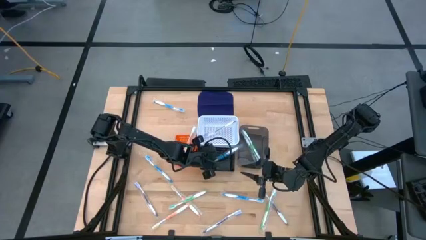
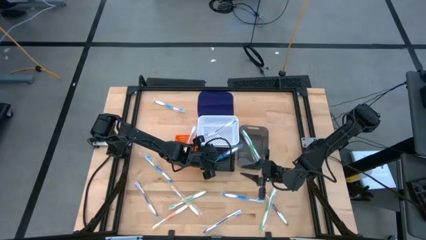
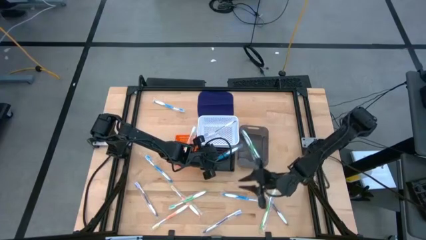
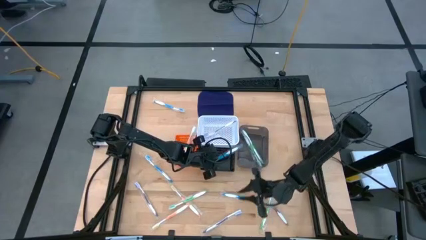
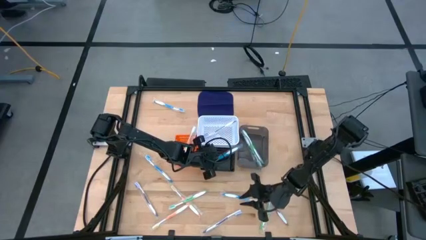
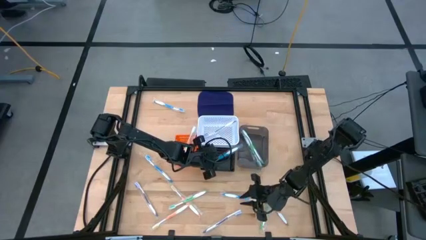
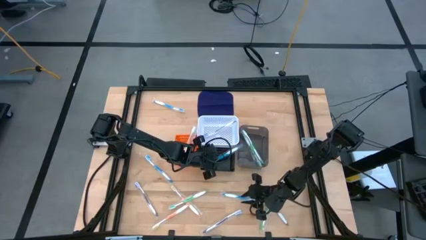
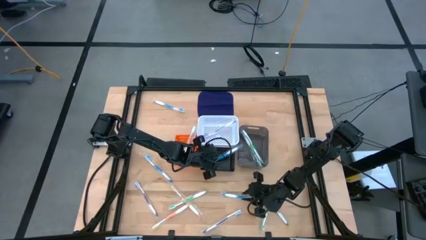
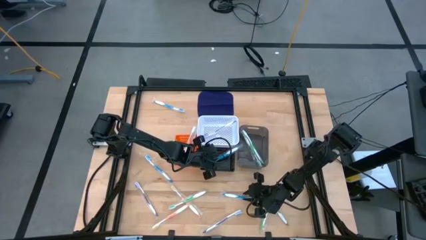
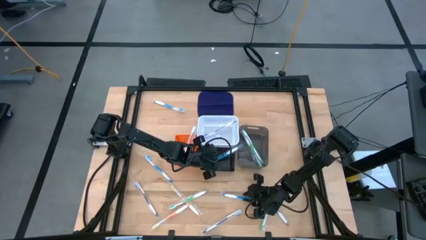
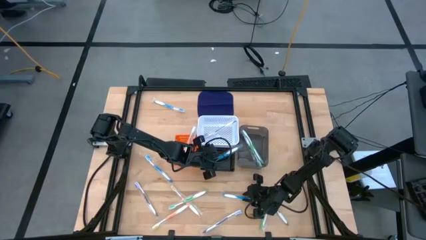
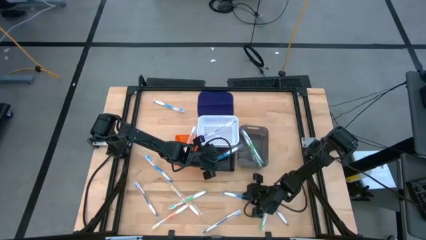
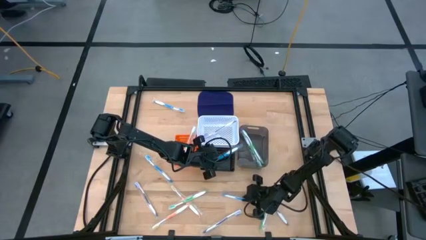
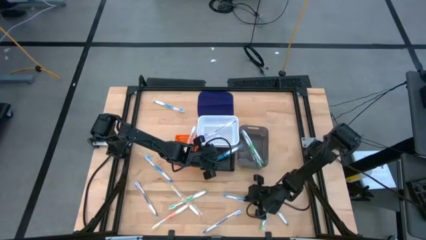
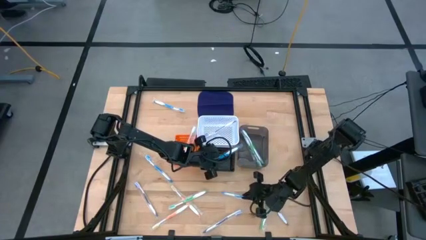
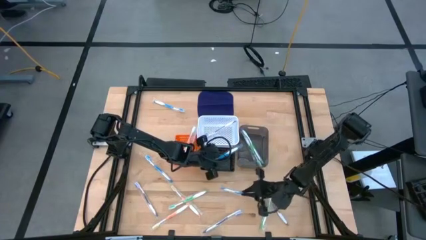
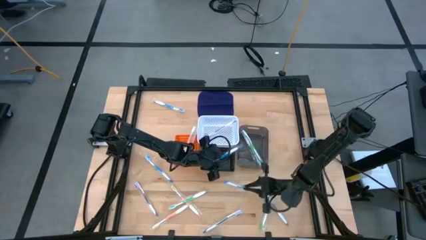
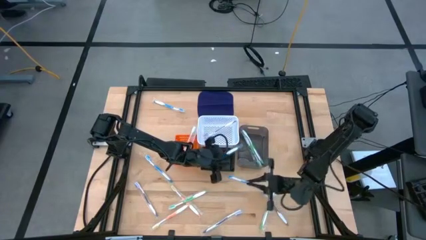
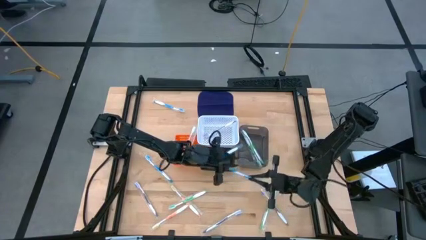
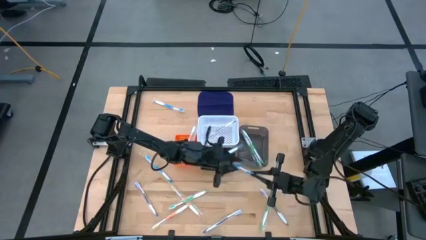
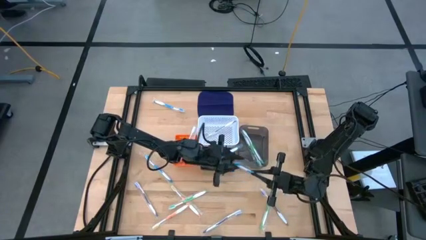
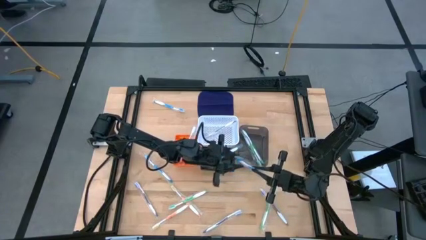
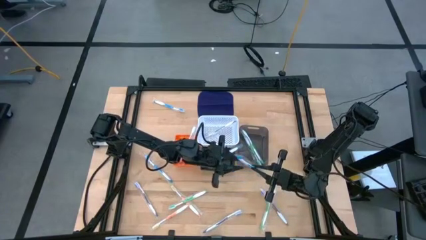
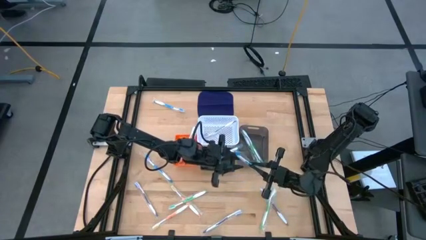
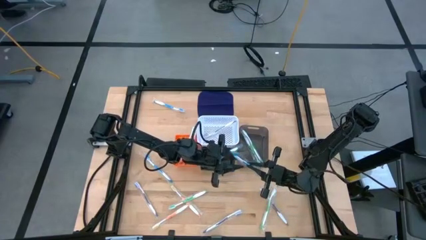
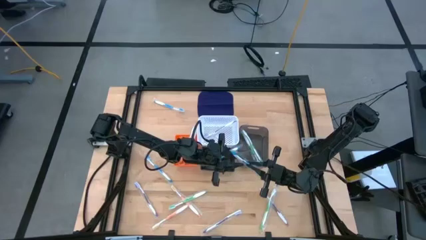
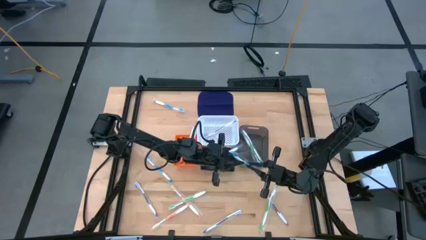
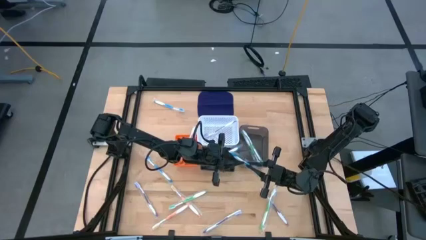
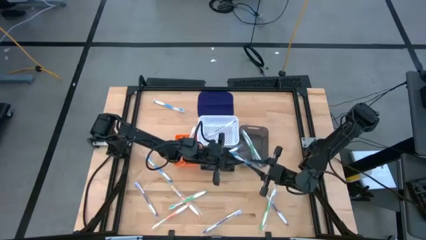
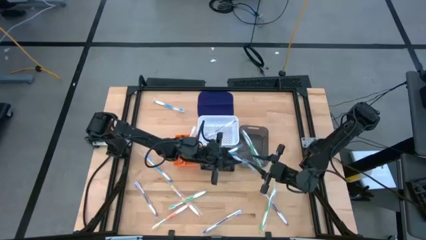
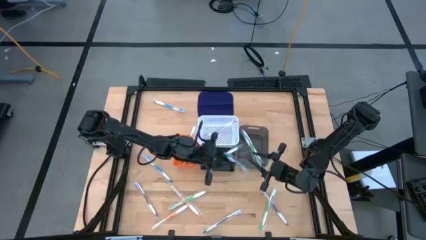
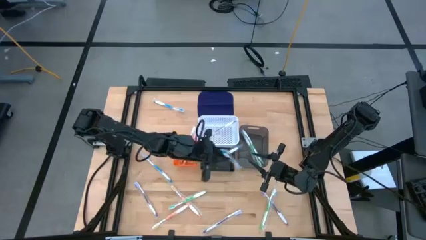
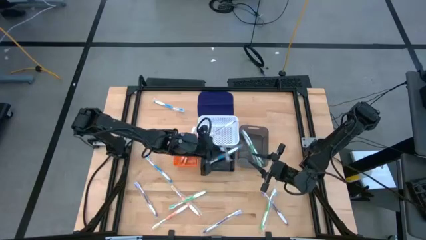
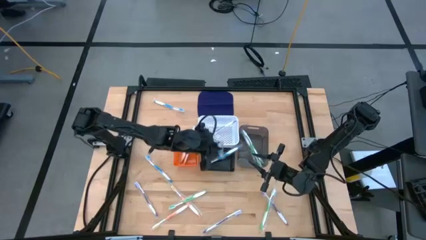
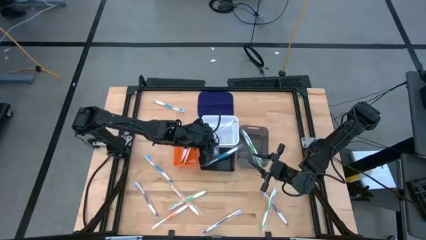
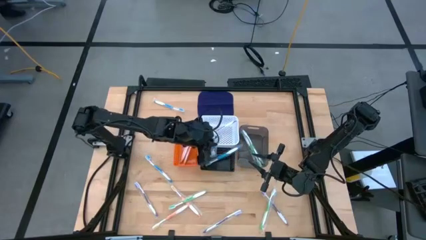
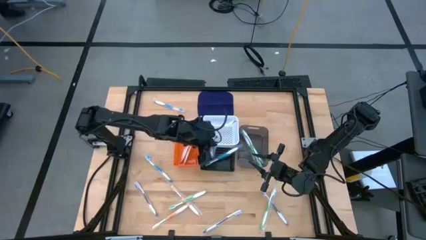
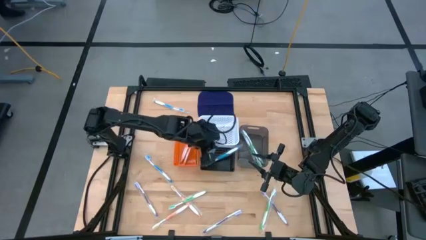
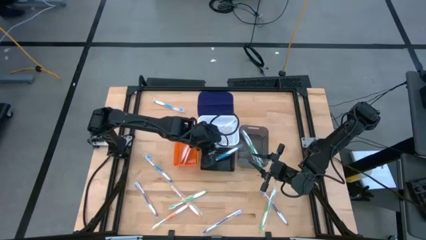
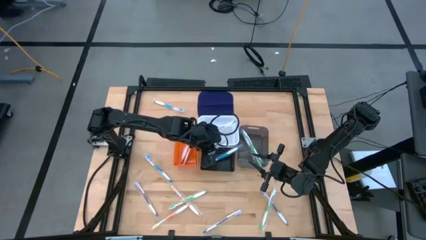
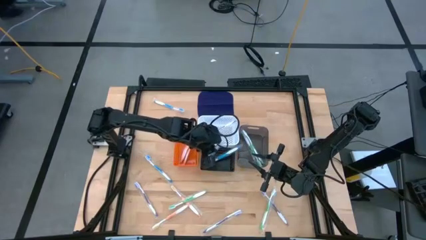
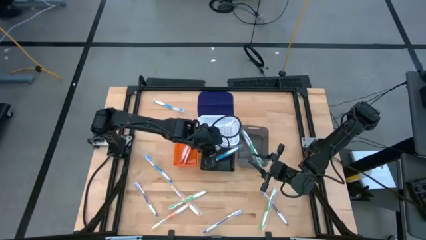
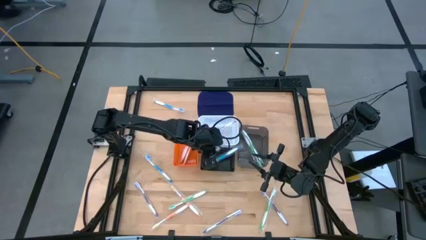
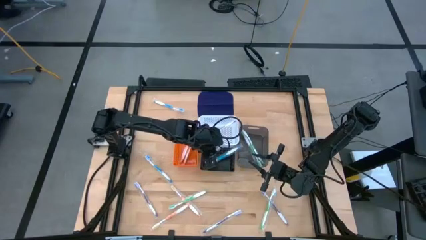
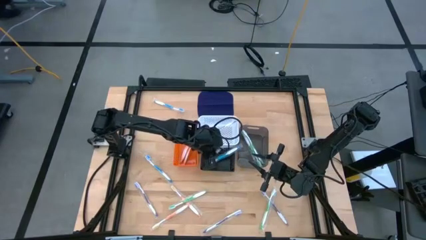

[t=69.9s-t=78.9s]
Task: Pick & Place Toothbrushes
Put the blue toothbrush into the black basket

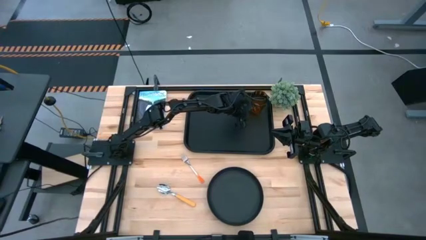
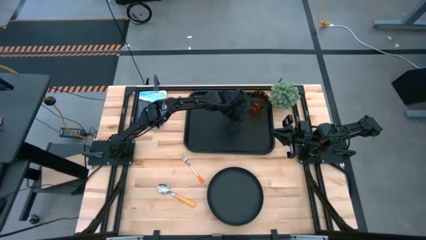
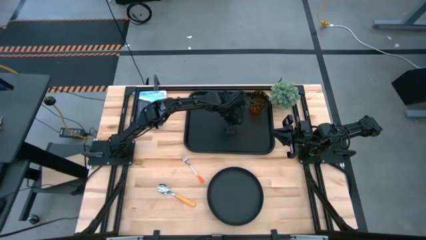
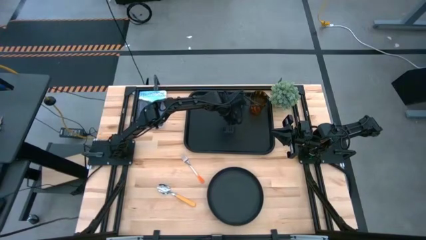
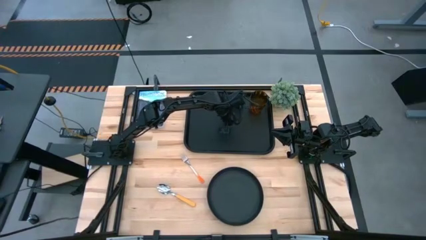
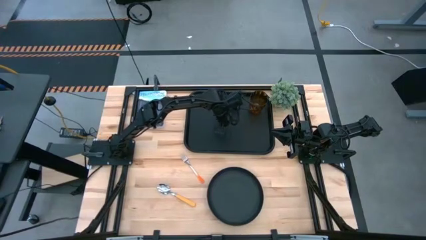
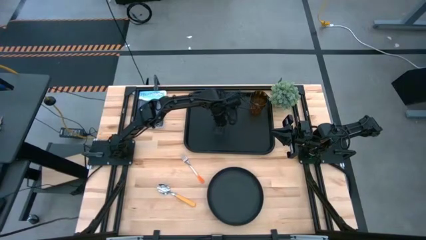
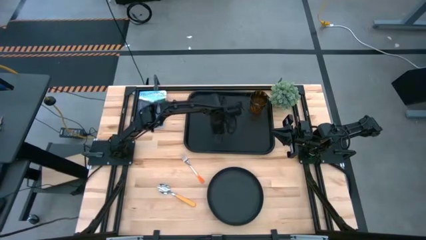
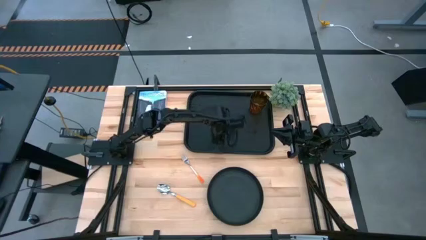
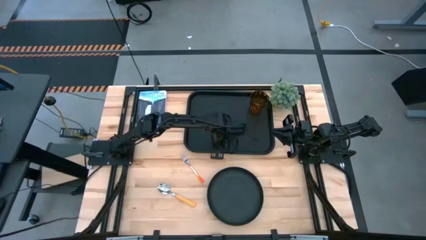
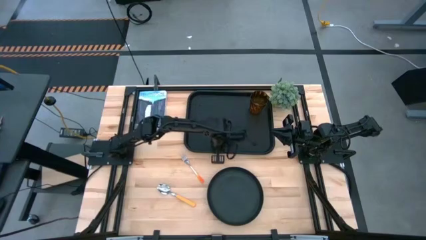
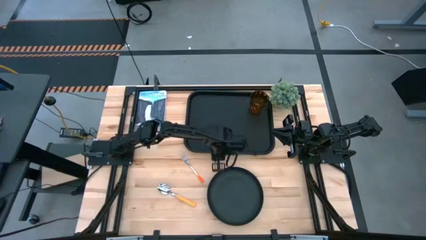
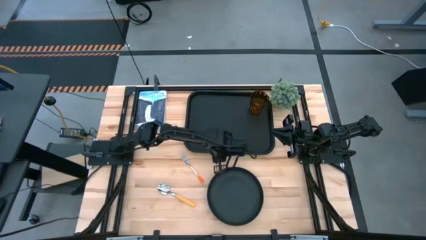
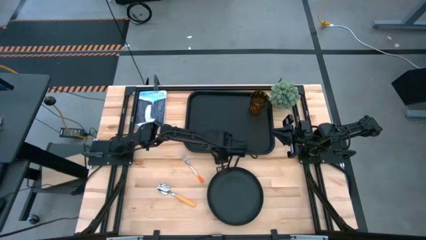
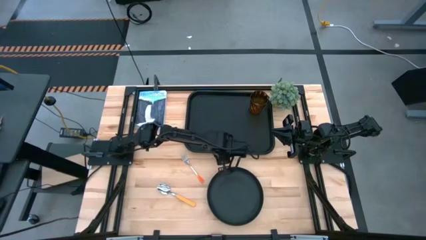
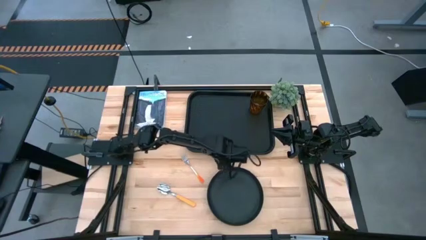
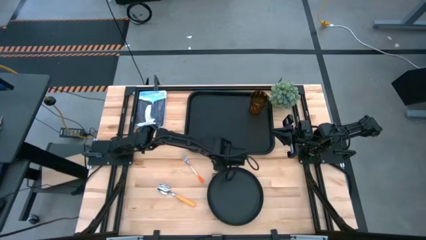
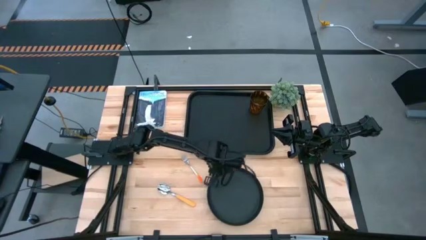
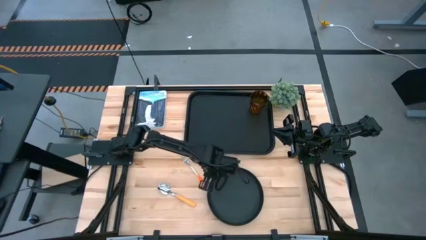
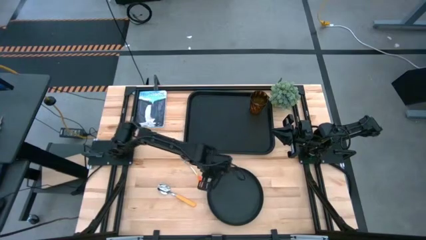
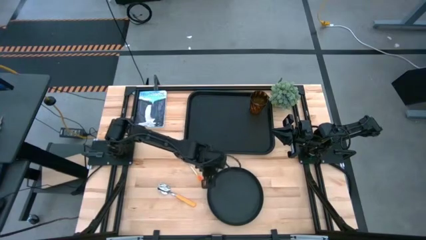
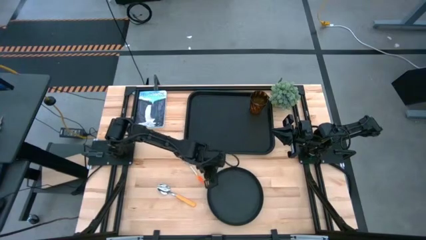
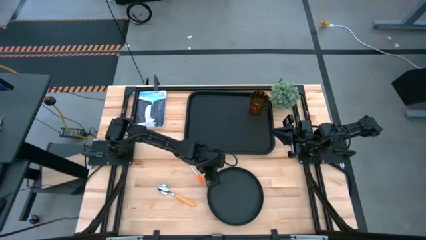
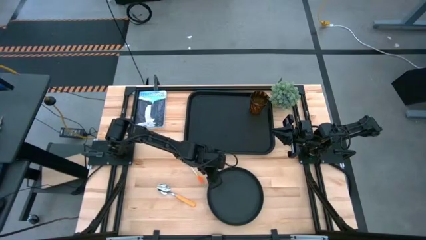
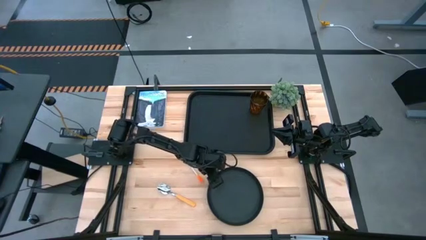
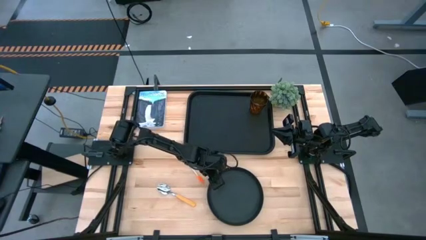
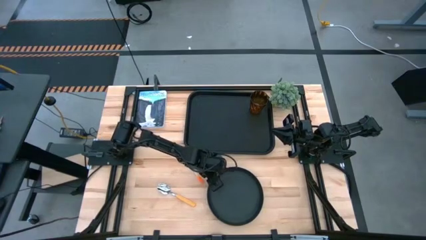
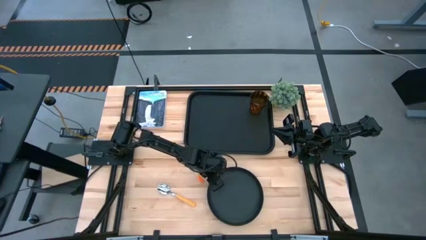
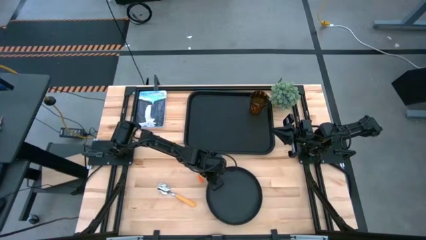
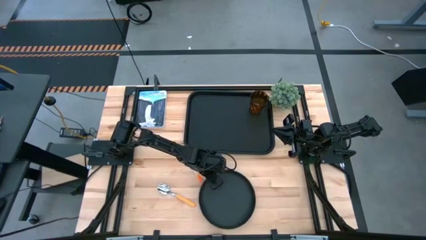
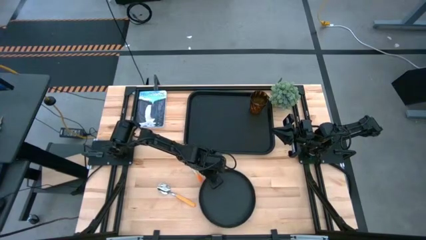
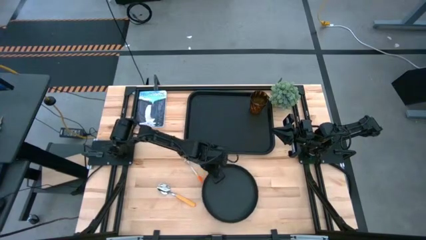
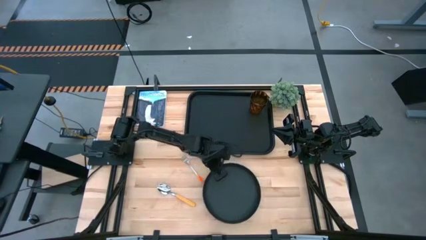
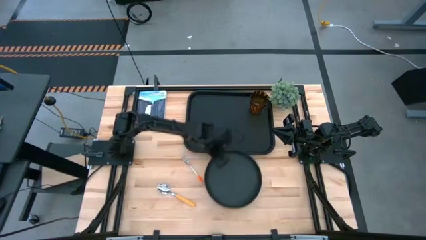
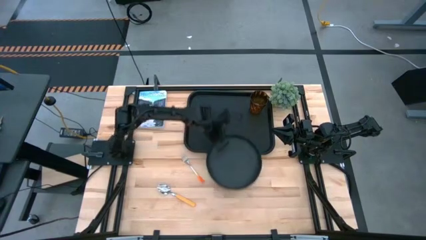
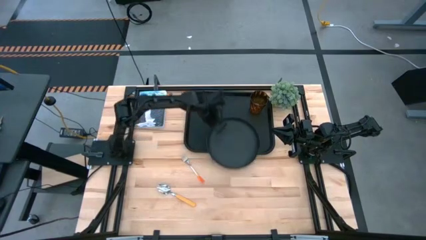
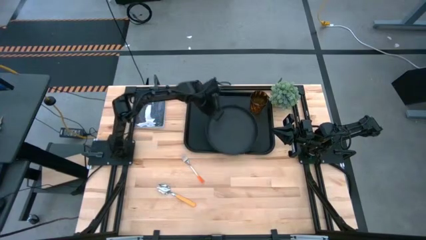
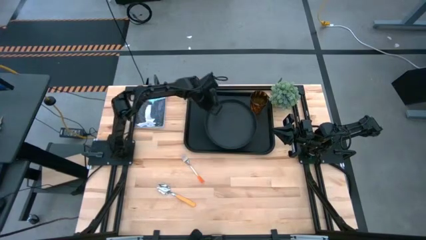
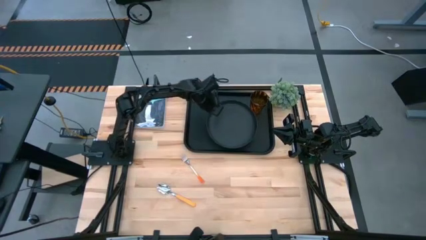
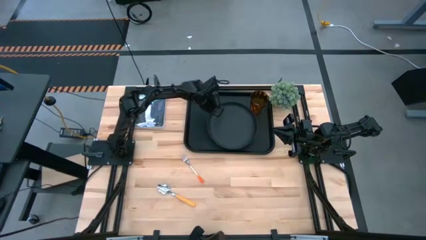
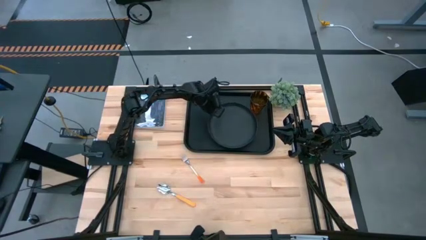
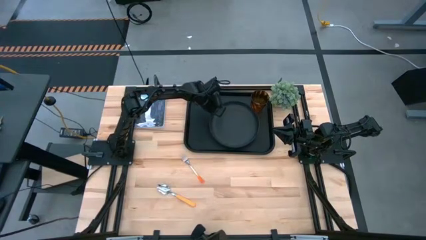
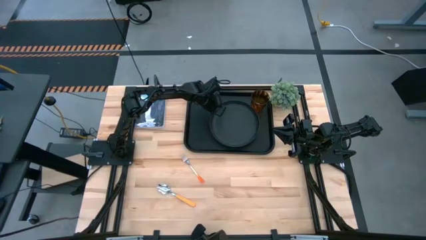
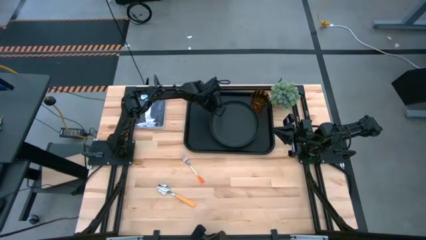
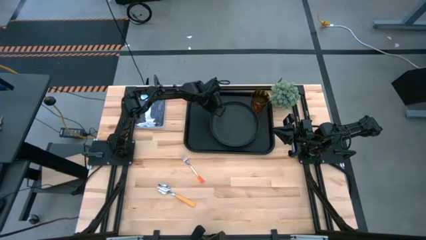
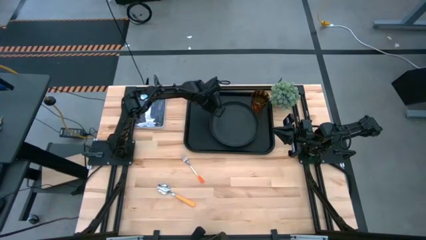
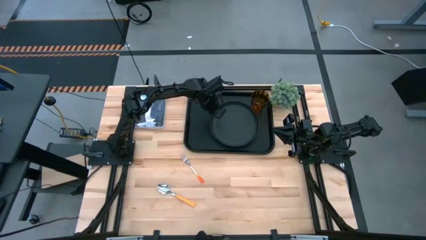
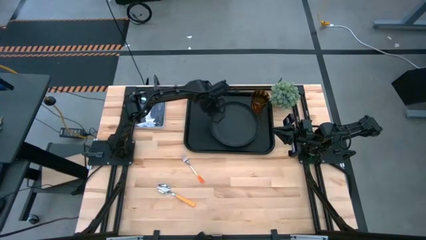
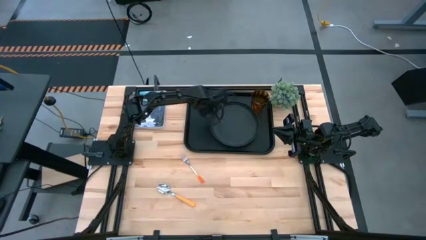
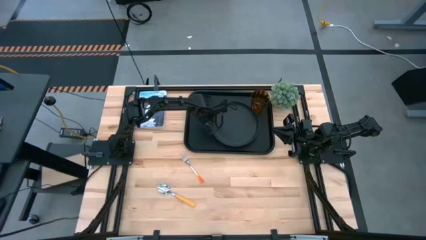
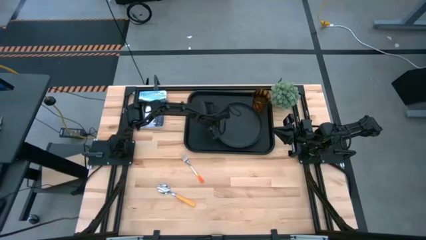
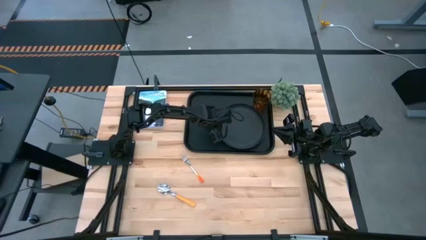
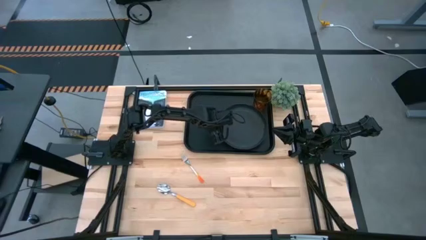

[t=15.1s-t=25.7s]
Task: Pick and place plate/cup/fork/spoon on tray
Put the black plate on the black tray to the bottom left of the orange glass
